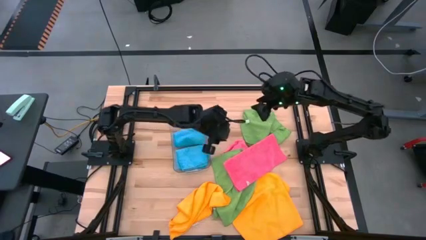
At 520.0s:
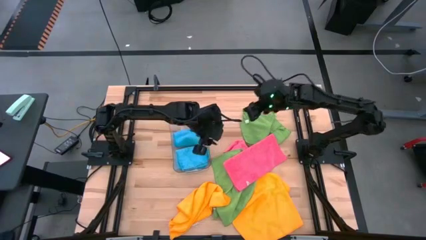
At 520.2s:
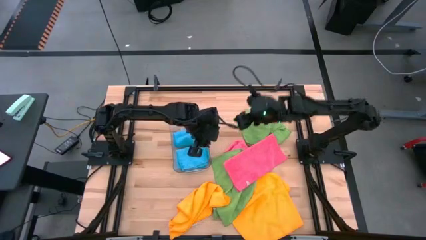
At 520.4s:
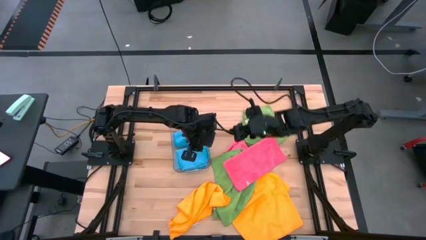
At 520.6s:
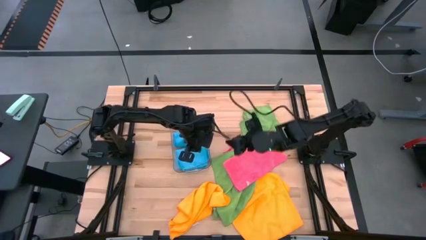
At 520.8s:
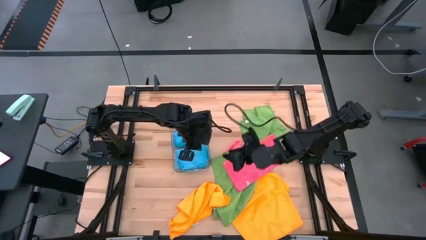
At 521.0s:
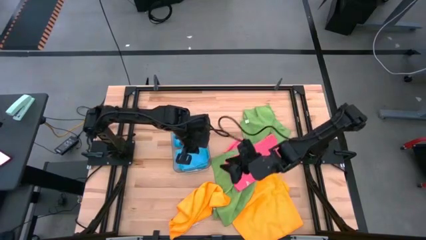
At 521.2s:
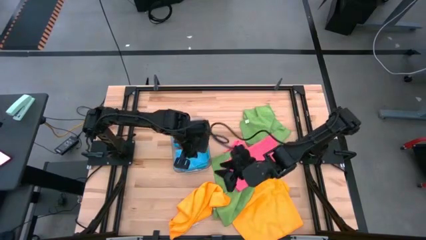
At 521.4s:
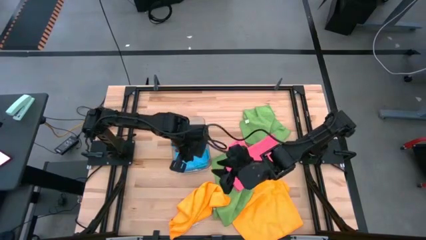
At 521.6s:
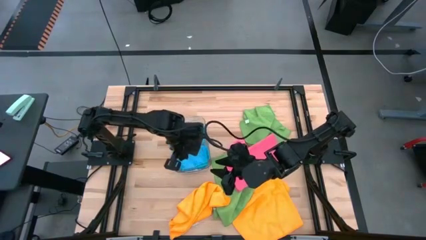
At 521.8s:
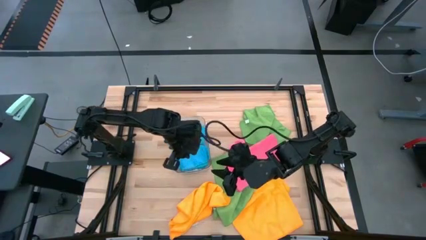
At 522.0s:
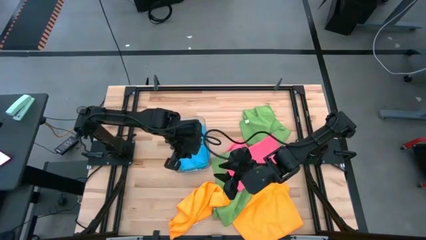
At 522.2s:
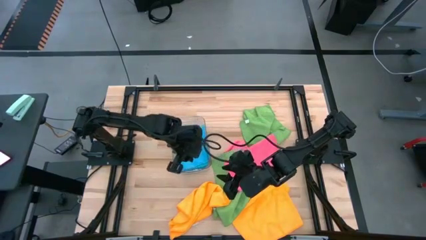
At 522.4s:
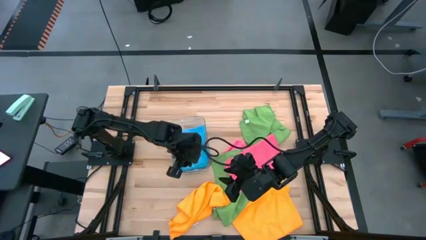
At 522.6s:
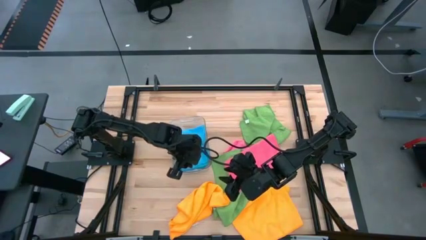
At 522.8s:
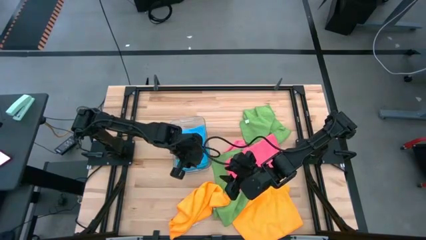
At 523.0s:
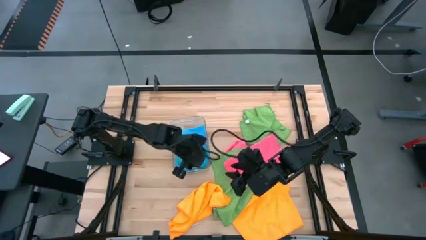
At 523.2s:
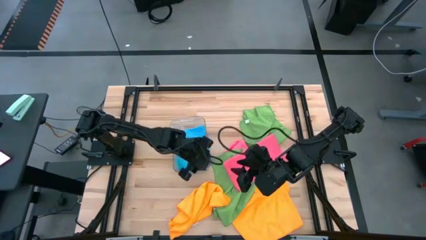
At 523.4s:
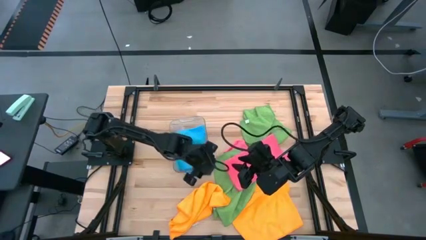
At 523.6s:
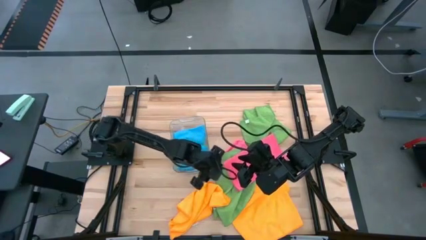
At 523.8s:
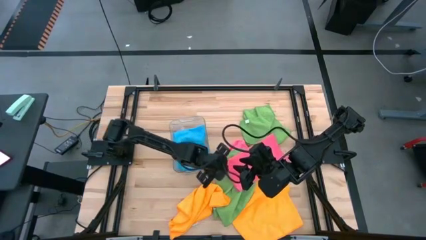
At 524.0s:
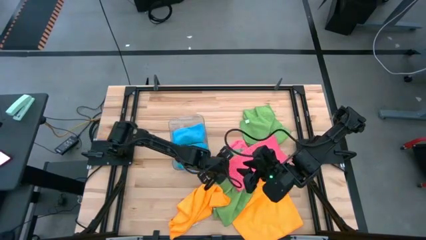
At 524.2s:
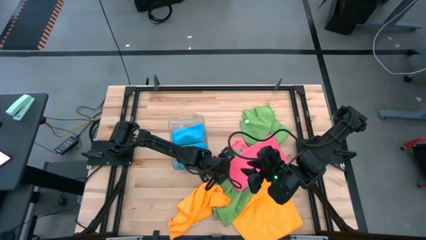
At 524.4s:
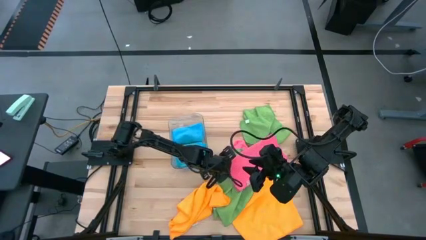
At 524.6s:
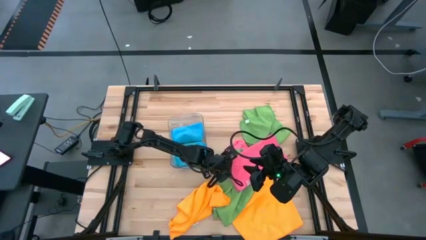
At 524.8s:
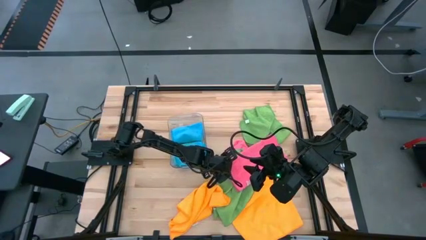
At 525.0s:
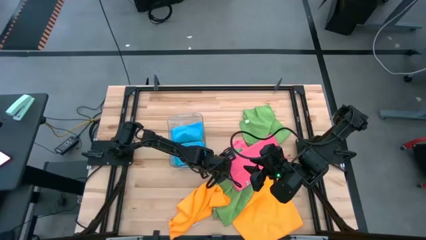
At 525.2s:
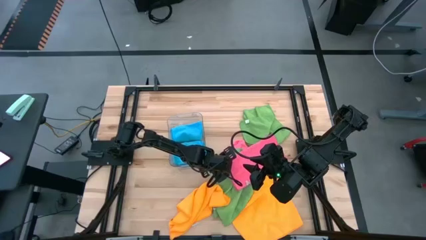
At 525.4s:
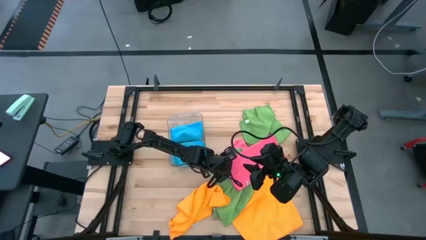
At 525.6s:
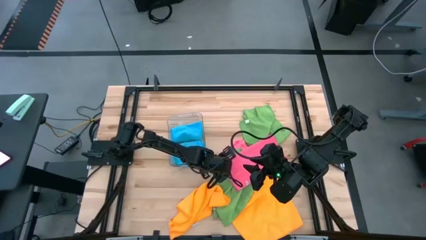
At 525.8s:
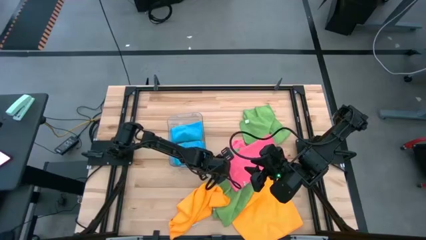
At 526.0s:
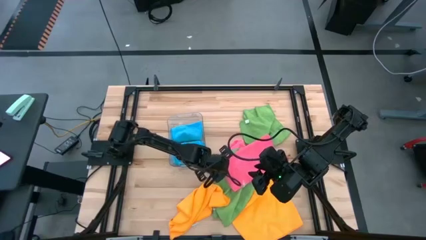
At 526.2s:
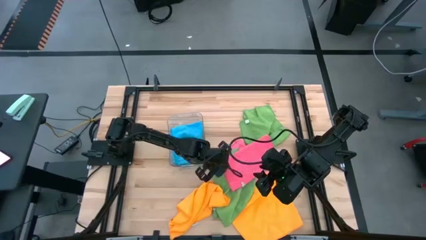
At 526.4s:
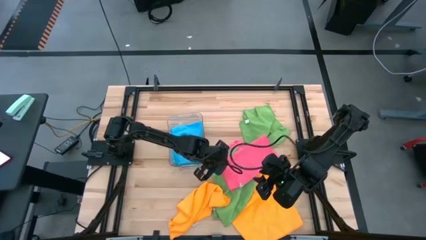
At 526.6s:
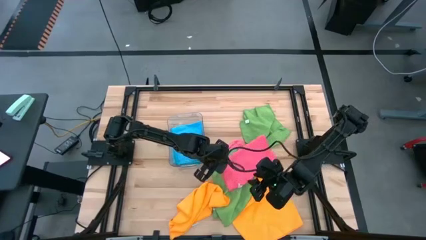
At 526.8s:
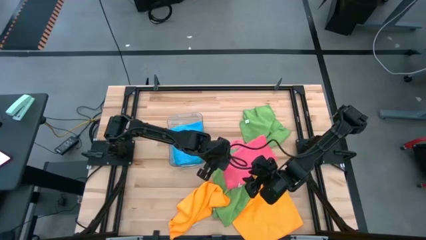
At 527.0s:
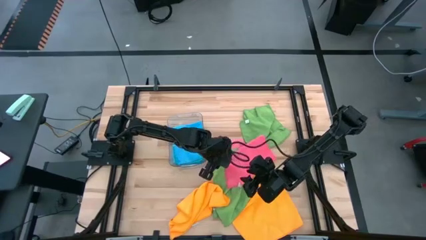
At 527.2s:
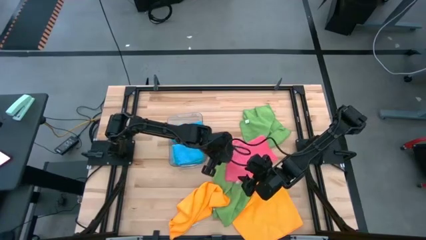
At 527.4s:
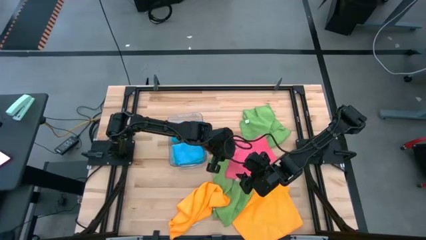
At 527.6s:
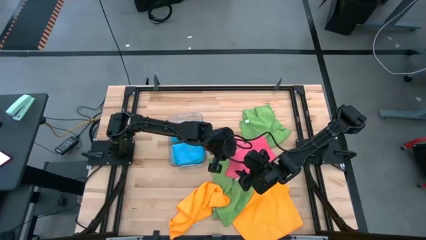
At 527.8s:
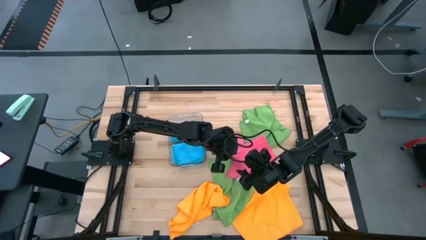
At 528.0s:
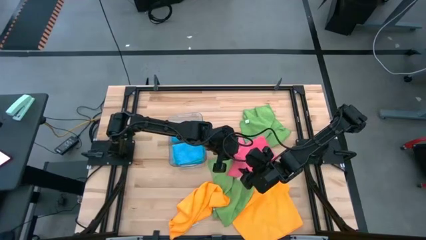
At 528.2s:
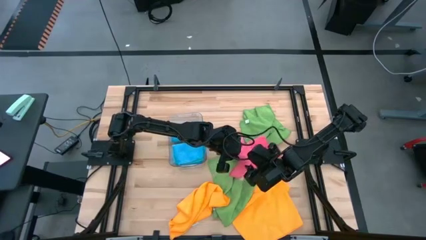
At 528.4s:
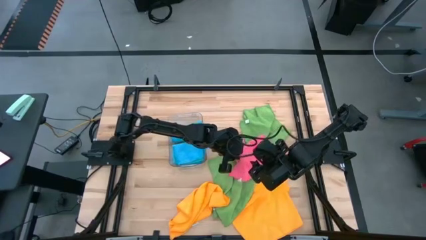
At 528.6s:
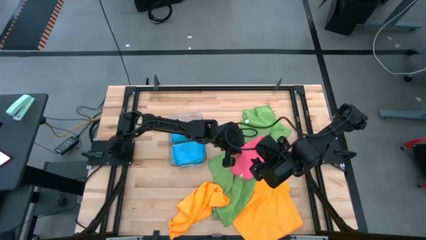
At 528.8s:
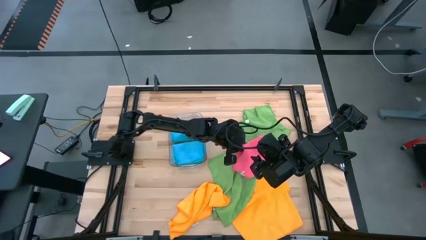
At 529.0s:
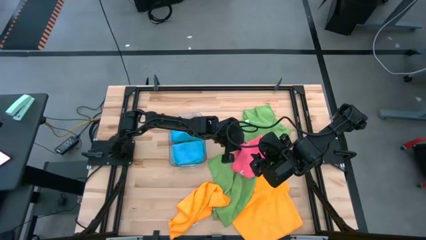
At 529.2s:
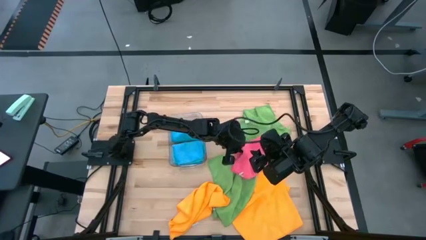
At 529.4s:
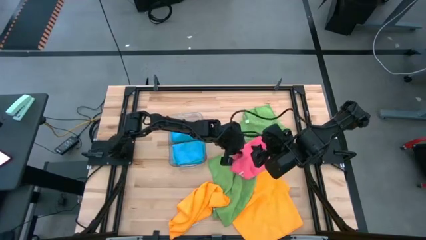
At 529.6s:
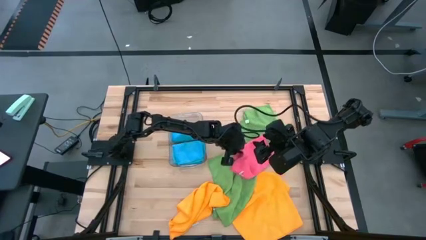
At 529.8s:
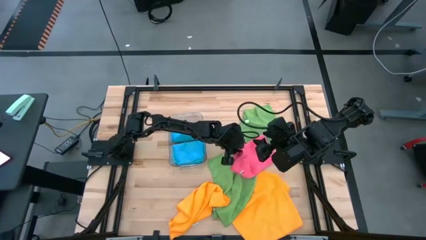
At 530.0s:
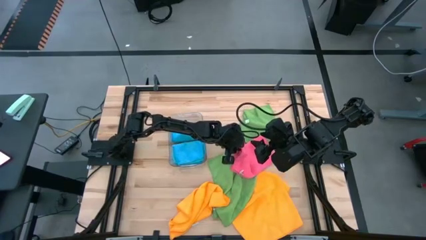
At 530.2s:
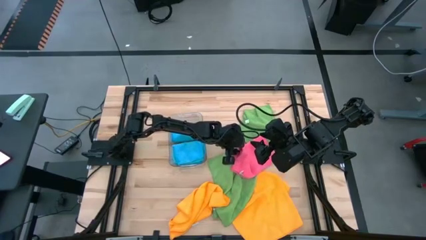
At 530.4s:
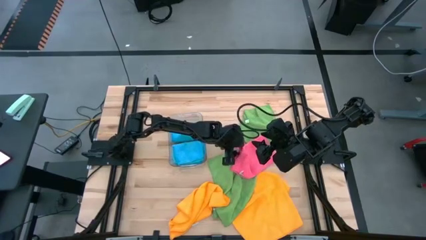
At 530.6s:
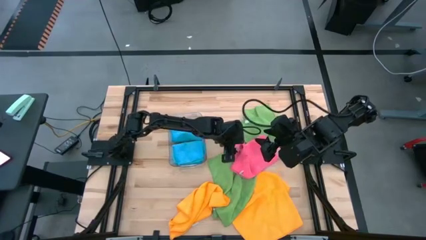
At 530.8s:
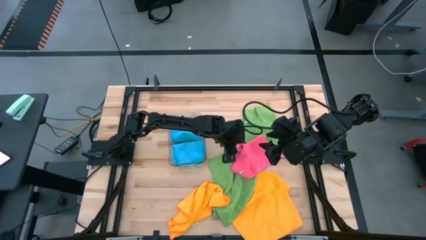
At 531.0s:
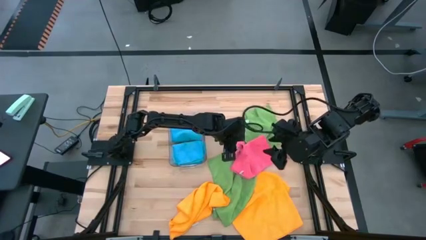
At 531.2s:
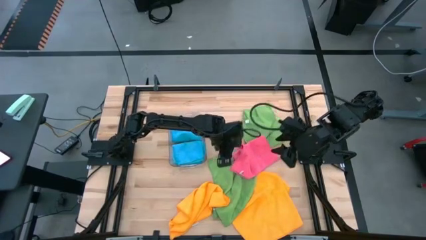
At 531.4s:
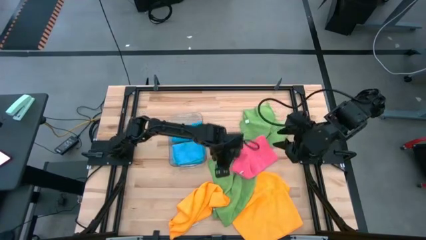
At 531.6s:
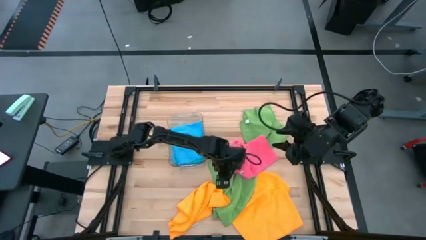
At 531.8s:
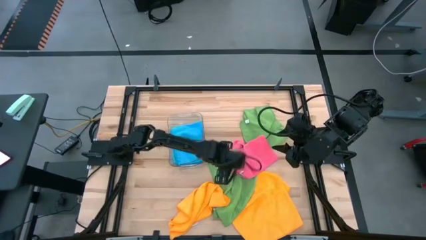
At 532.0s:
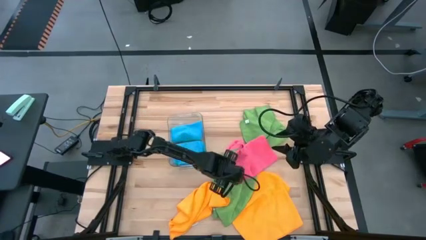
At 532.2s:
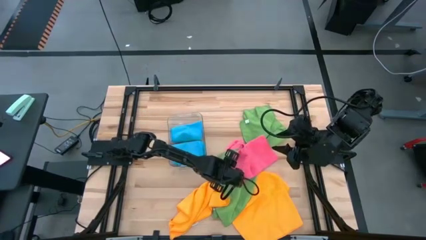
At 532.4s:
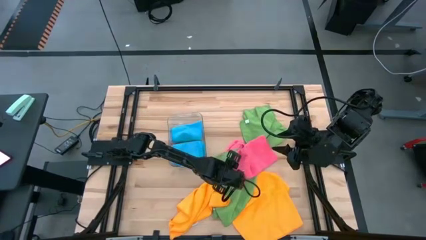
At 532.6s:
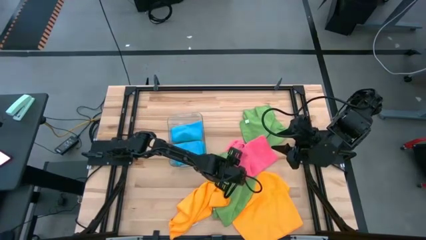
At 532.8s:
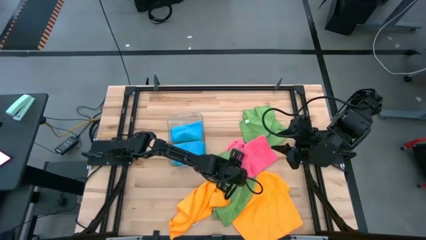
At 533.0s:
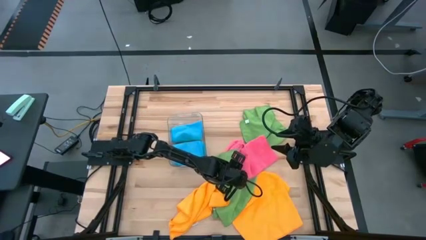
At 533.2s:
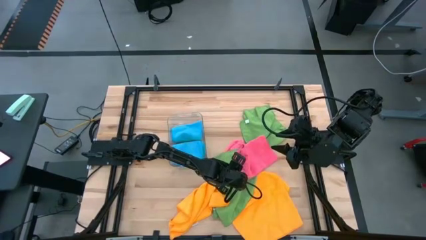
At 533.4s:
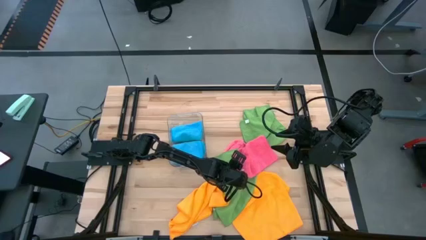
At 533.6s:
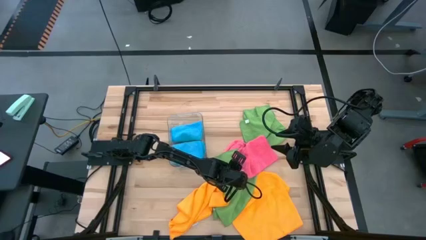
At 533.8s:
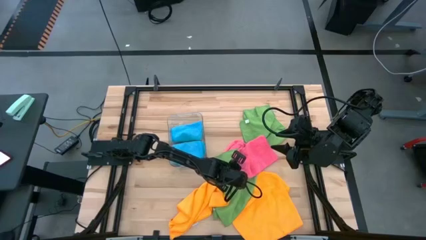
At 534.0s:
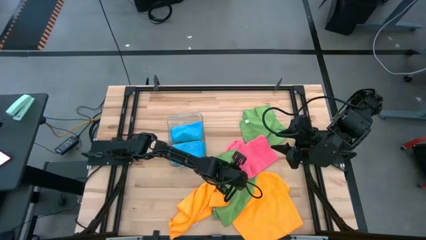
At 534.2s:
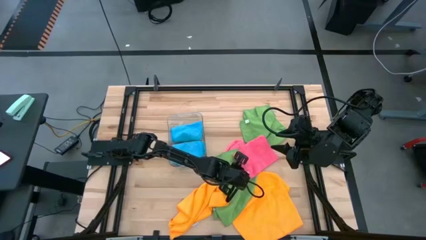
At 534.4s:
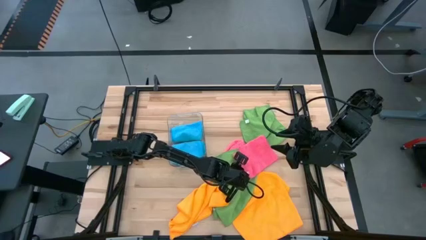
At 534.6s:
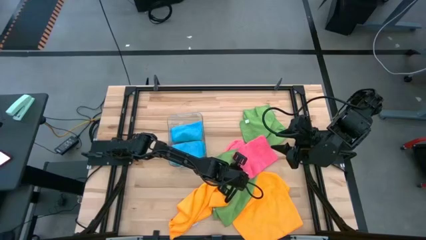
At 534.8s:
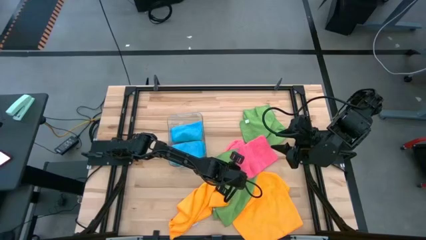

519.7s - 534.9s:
Task: Fold microfiber towels
Fold the top pink towel

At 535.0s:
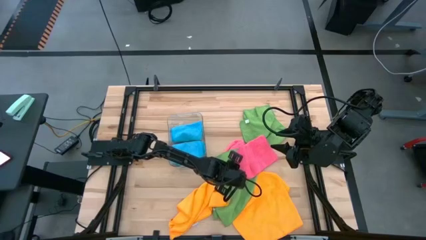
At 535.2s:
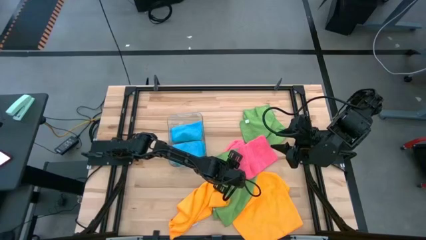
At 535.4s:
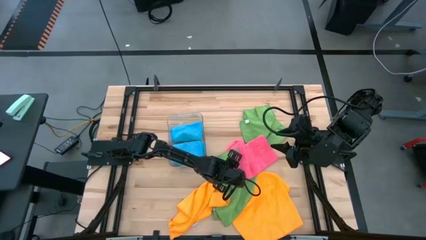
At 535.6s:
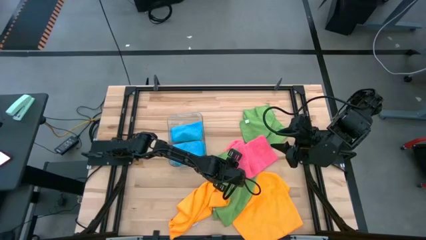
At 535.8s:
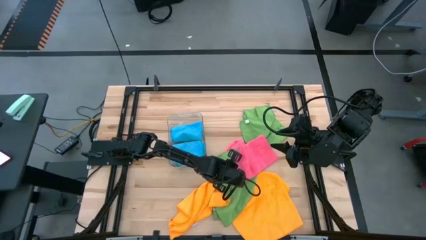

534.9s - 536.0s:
Fold the top pink towel
